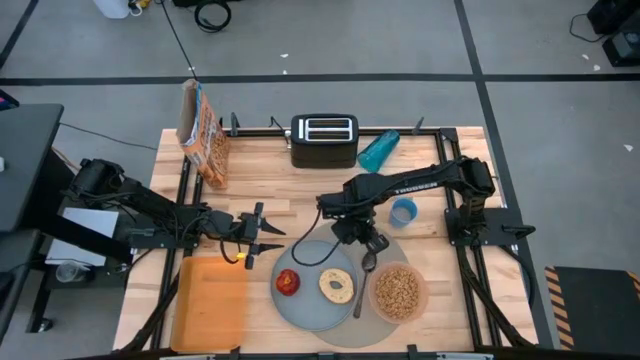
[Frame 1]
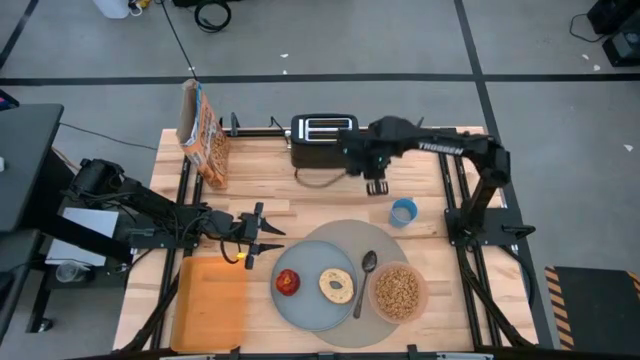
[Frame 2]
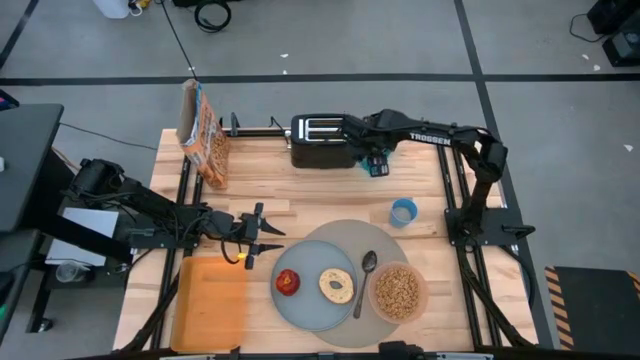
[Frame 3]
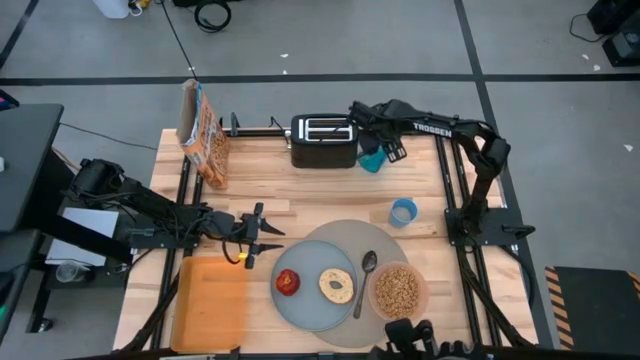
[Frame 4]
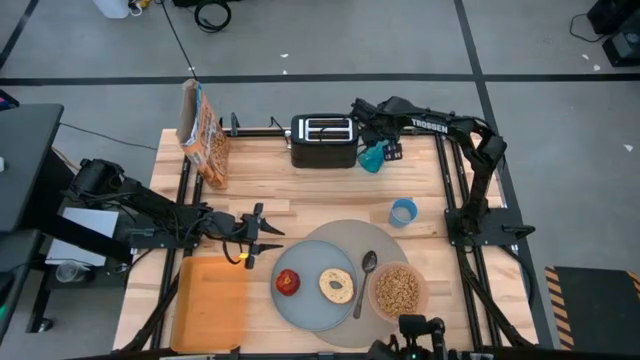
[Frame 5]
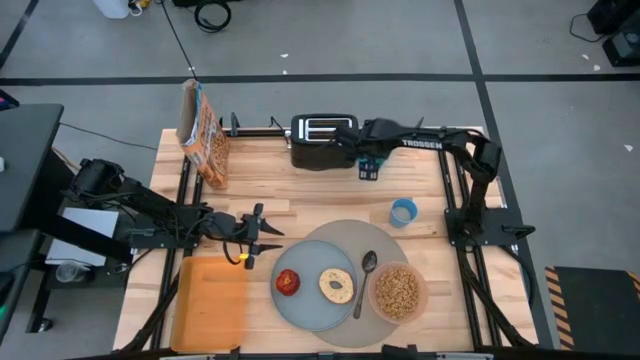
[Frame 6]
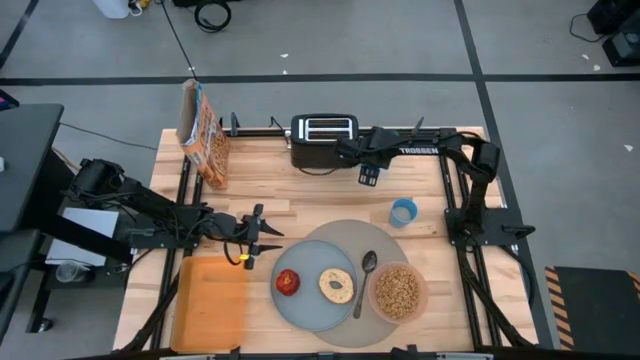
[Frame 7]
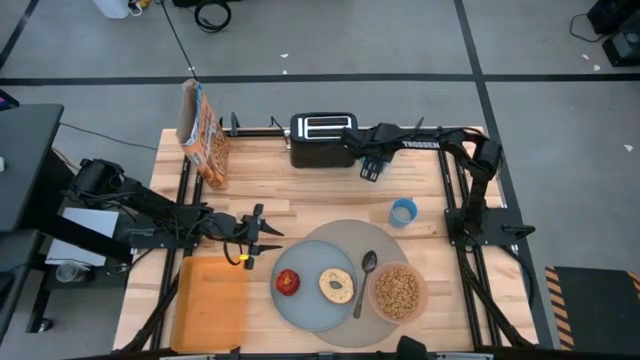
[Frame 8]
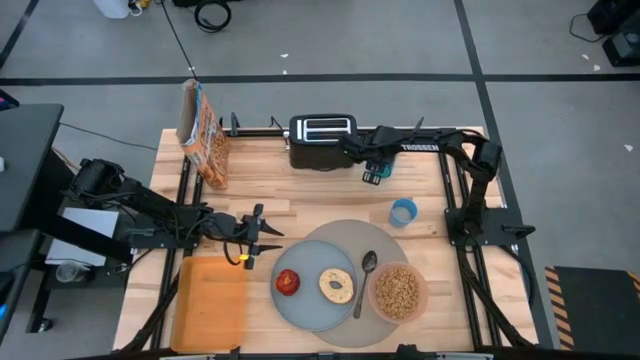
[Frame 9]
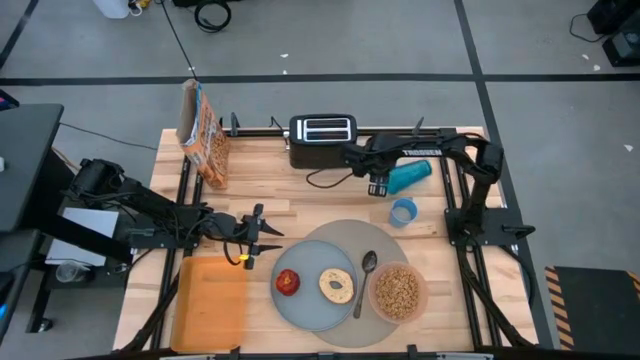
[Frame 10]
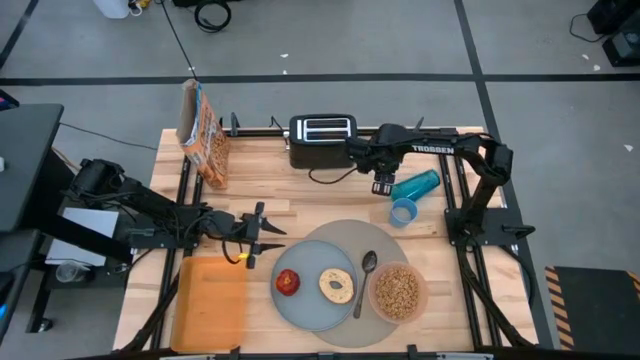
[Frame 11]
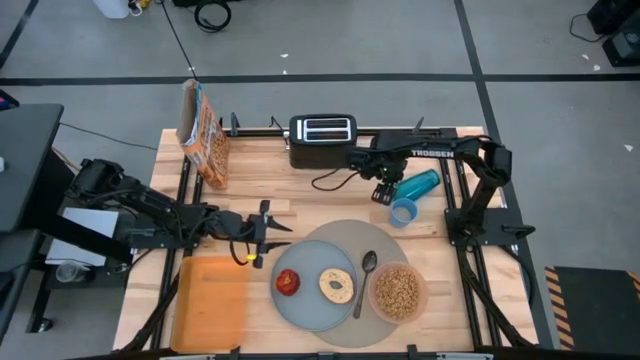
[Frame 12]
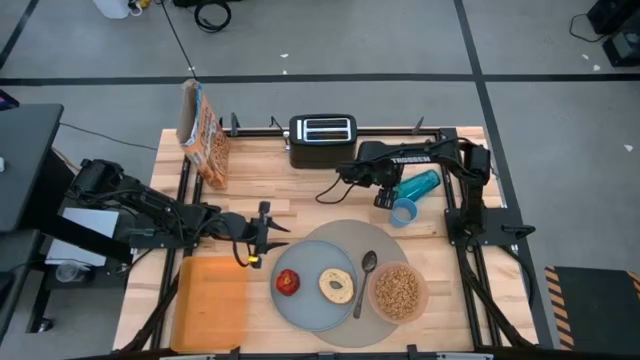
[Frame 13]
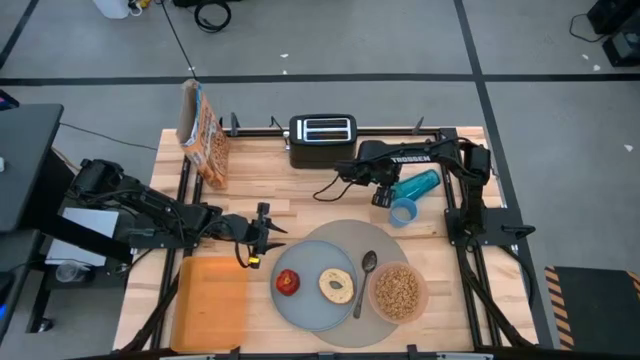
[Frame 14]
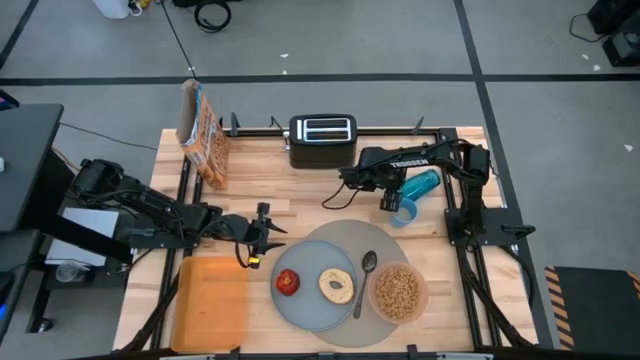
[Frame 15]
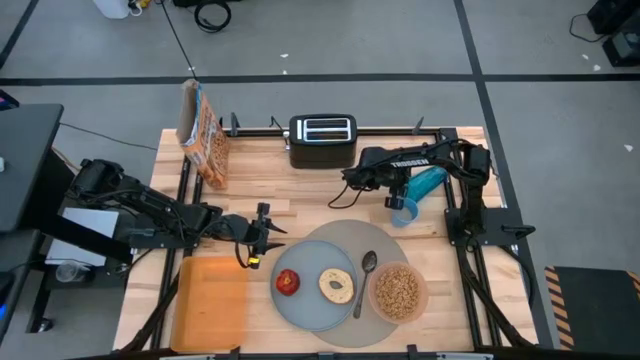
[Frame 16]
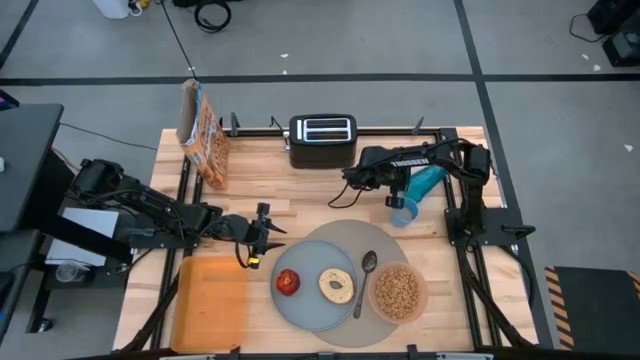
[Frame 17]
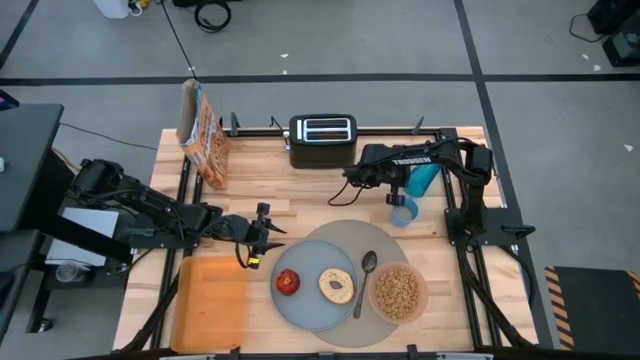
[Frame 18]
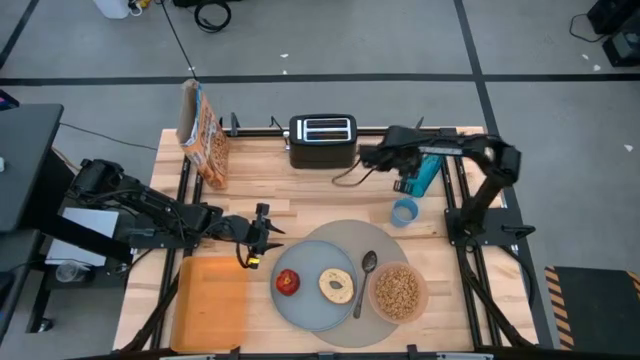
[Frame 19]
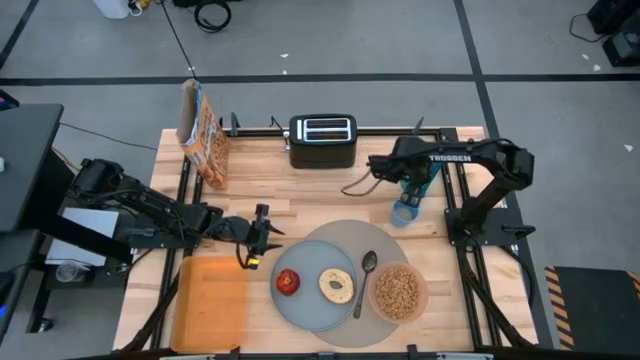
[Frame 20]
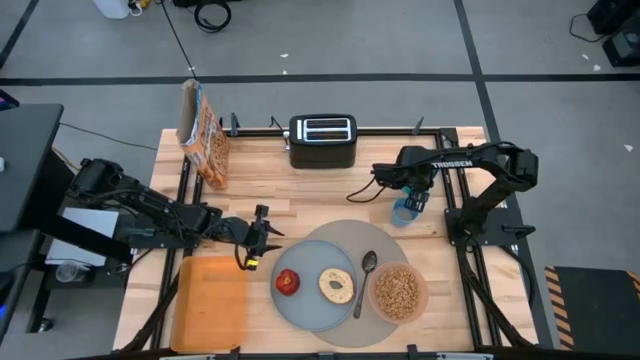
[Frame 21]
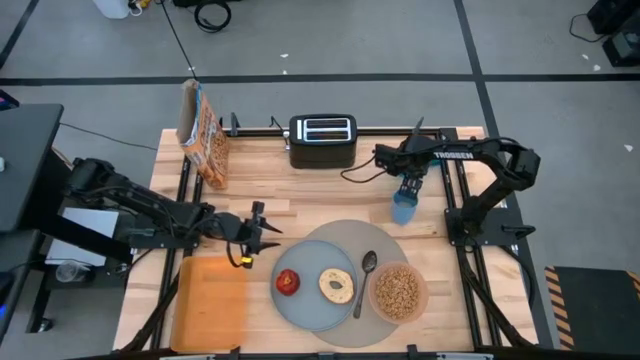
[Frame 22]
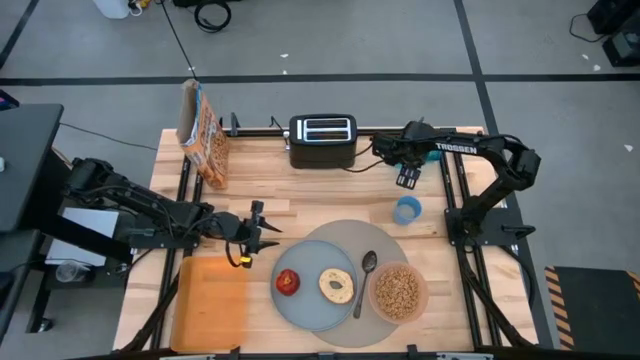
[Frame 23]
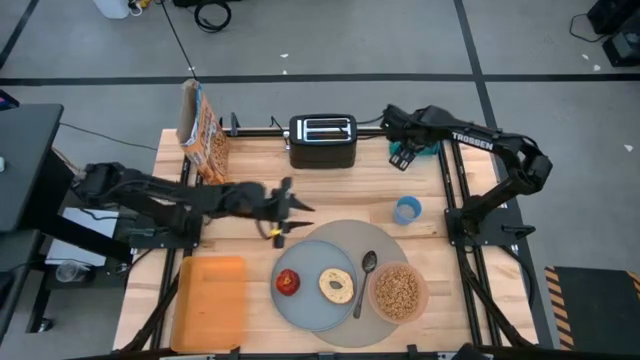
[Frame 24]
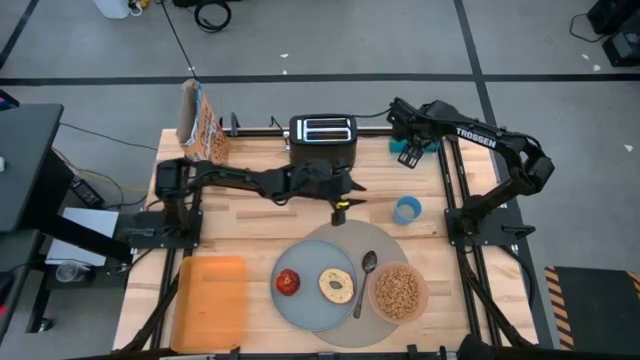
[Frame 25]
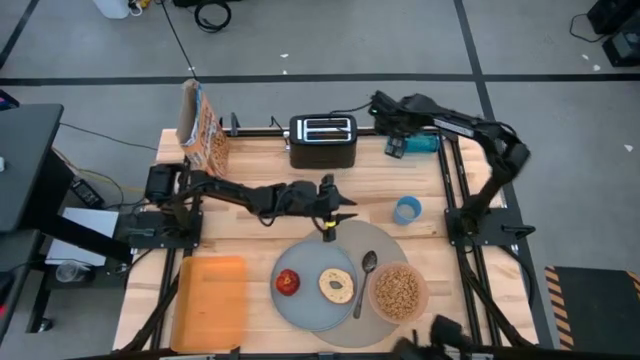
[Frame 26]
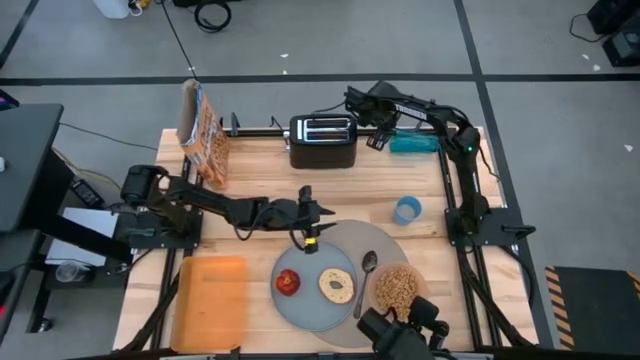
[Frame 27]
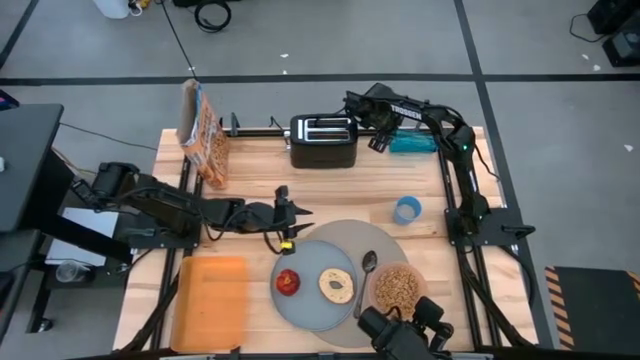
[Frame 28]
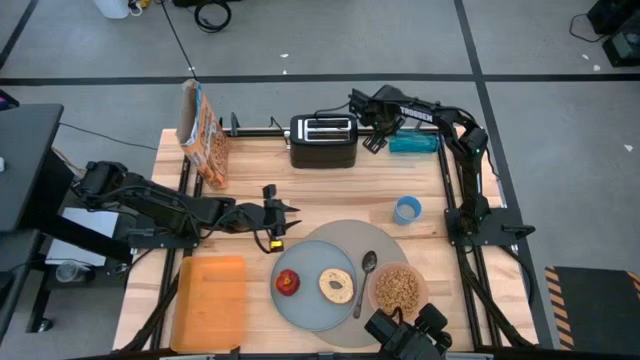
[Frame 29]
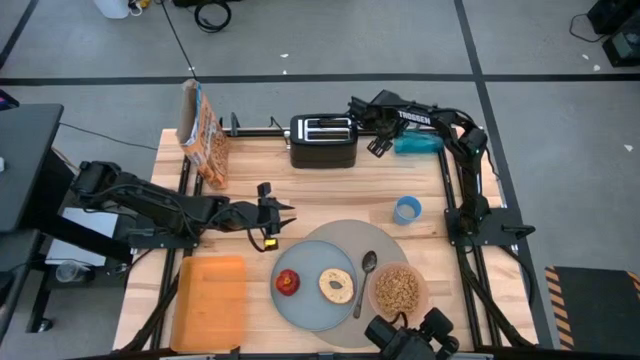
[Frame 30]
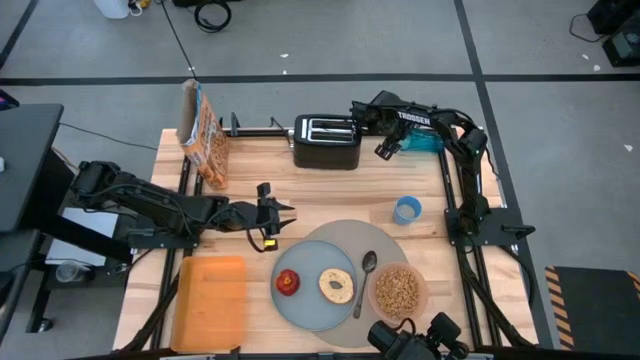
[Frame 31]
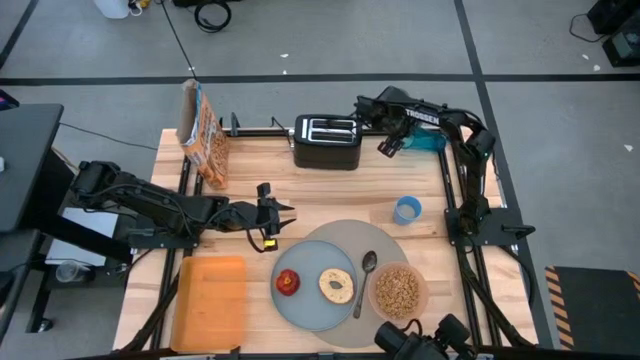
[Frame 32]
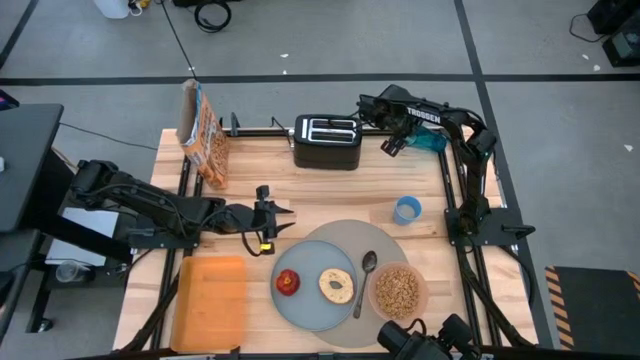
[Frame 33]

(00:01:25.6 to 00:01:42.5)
Task: Arrange a breakfast setting
Move the blue cup to the top of the table placemat

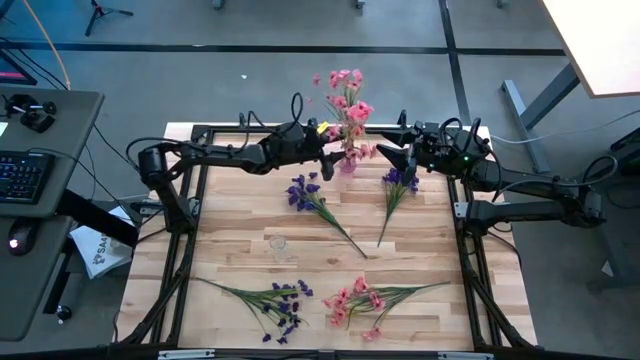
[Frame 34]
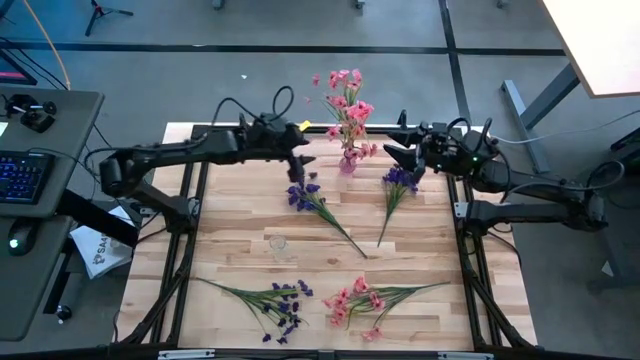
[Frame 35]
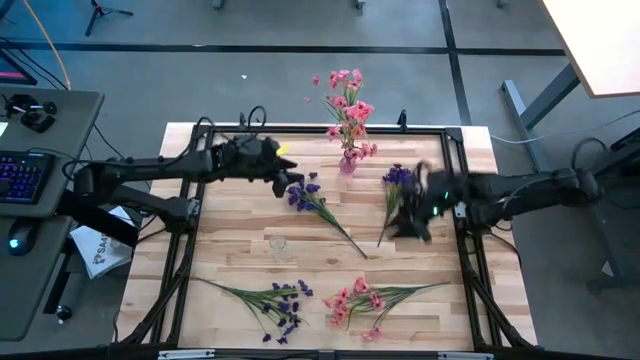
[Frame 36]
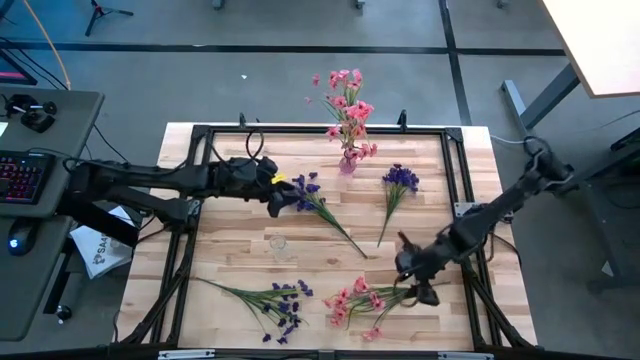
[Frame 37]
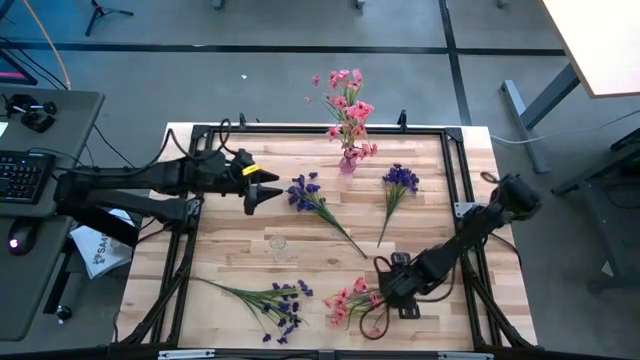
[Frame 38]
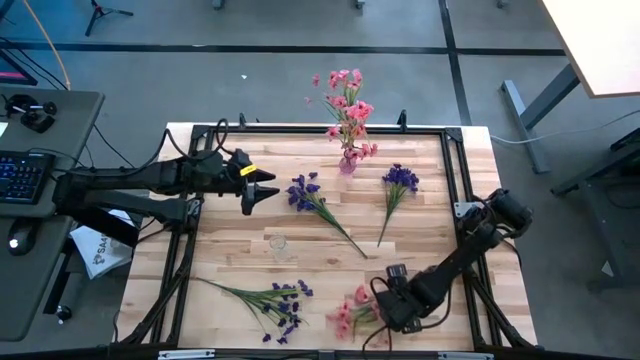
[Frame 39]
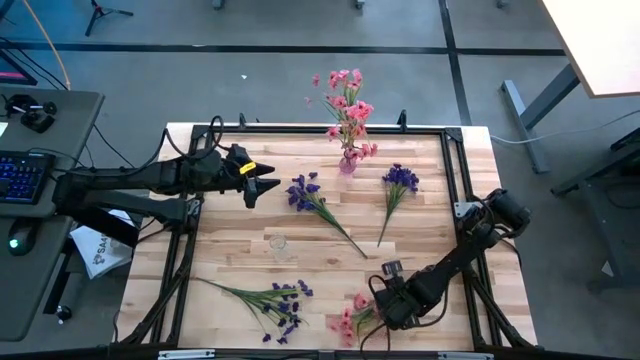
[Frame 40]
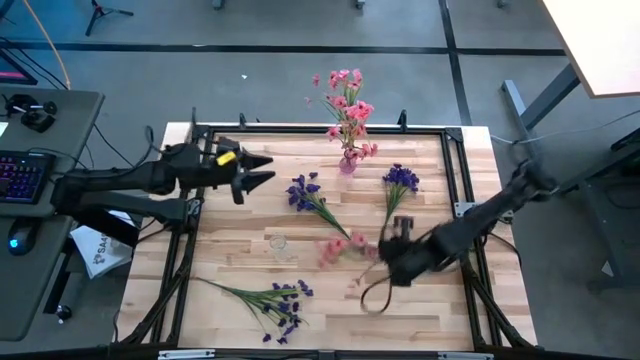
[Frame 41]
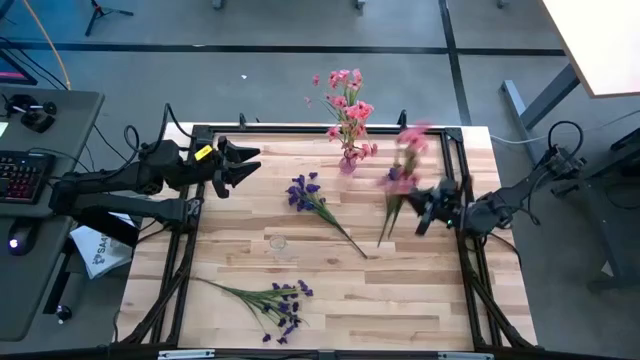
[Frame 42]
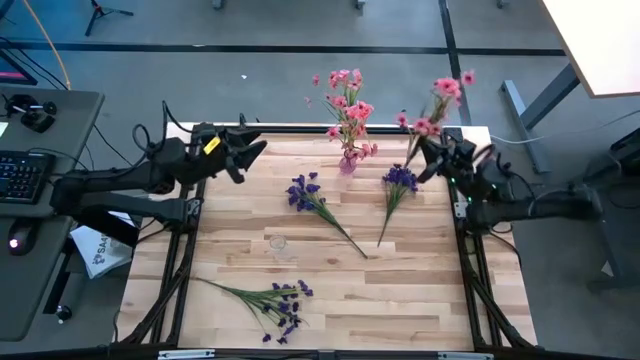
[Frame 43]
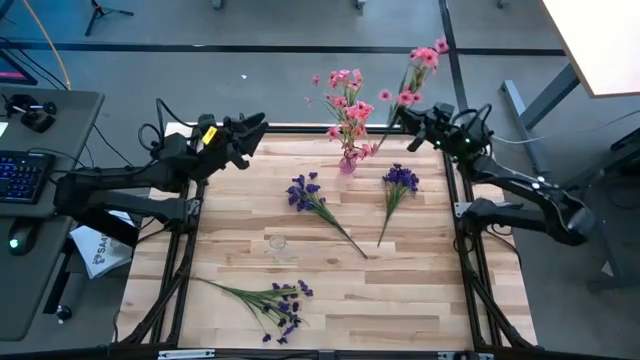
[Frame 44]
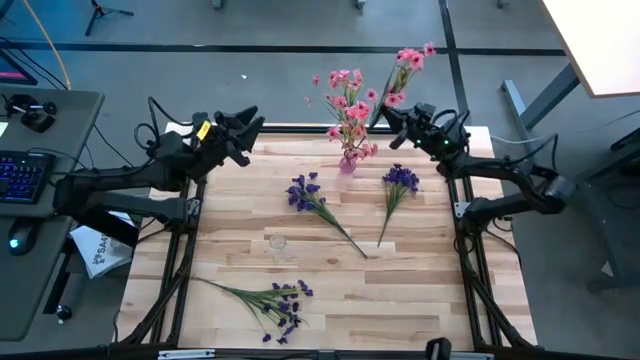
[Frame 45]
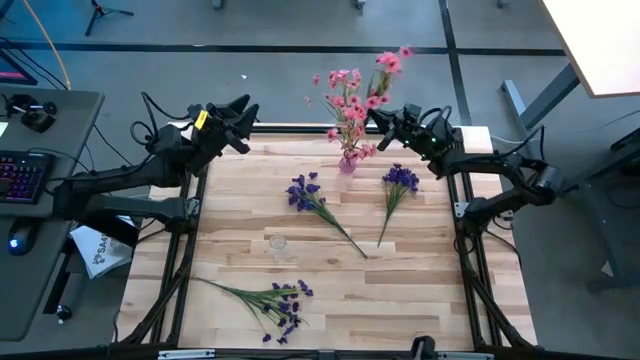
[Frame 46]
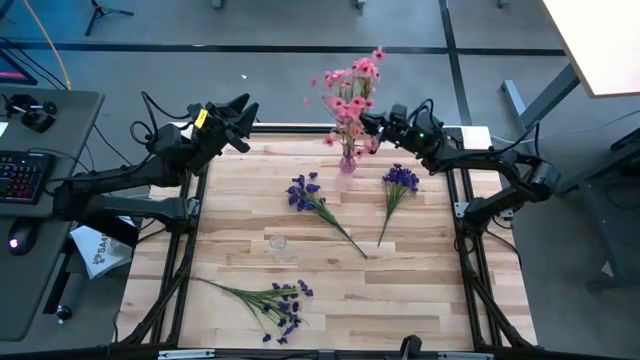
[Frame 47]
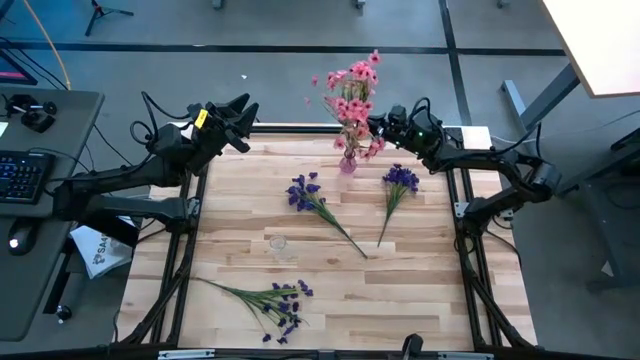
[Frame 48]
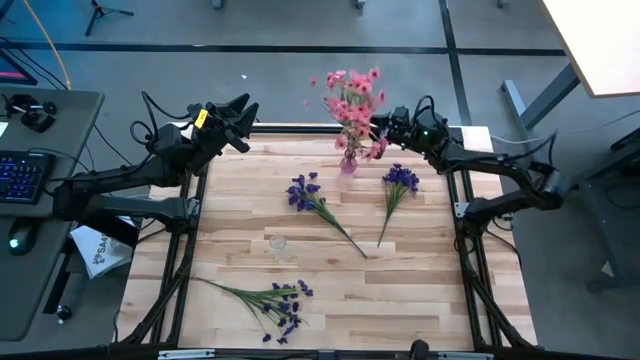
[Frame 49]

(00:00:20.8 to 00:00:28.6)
Task: Sort flowers into vase by color
Put the pink flowers into the pink vase
